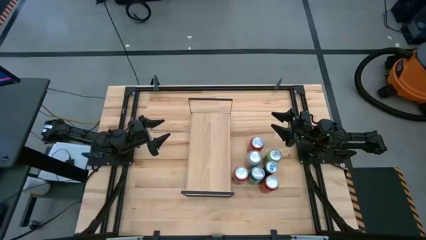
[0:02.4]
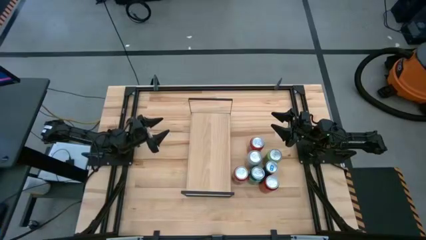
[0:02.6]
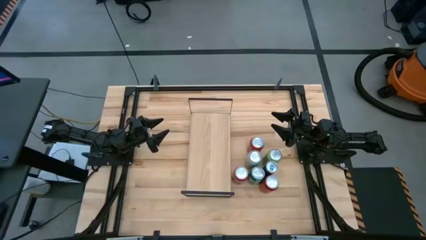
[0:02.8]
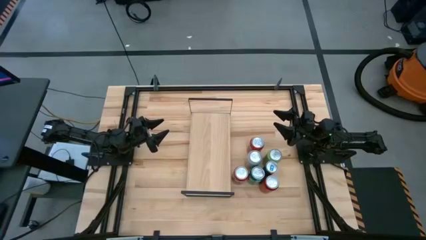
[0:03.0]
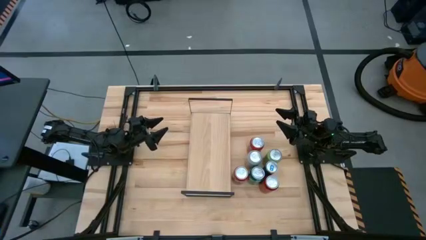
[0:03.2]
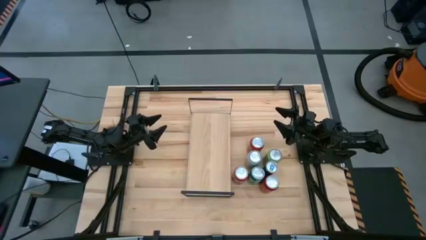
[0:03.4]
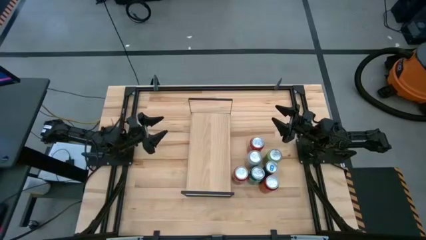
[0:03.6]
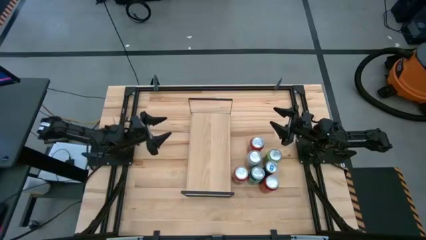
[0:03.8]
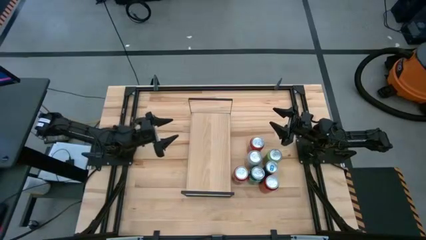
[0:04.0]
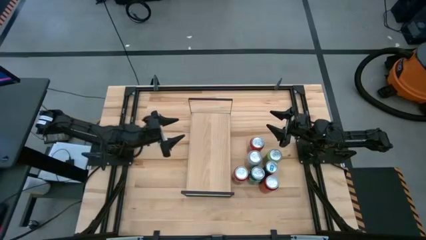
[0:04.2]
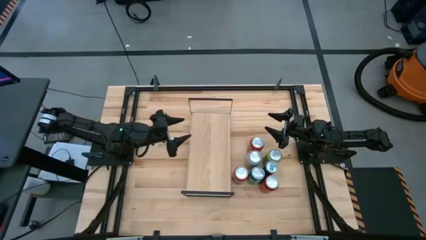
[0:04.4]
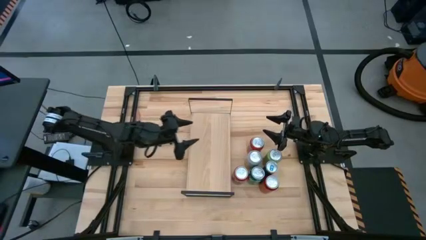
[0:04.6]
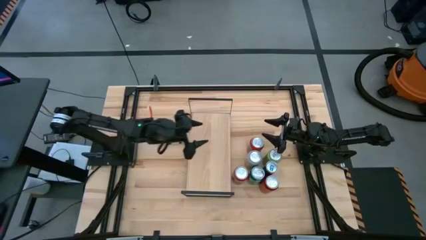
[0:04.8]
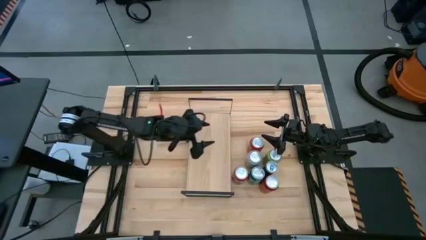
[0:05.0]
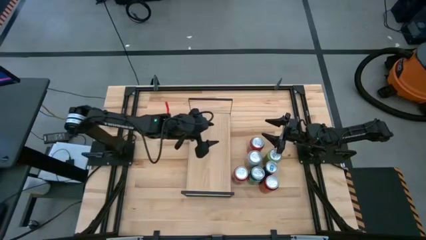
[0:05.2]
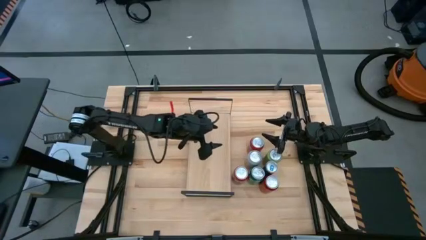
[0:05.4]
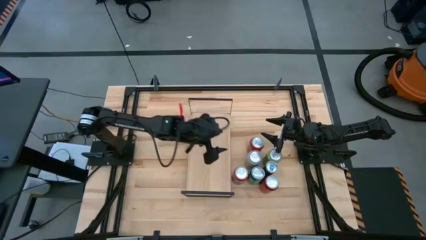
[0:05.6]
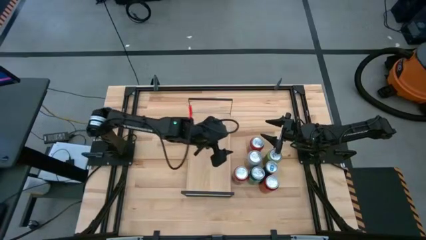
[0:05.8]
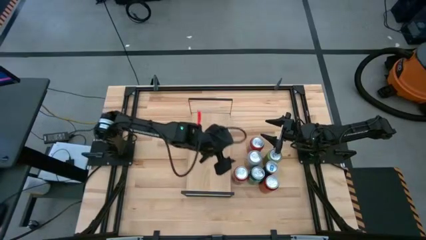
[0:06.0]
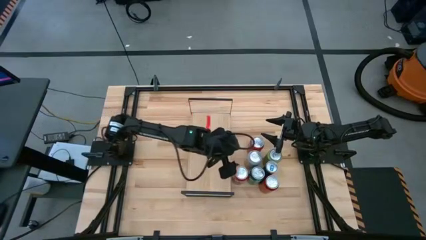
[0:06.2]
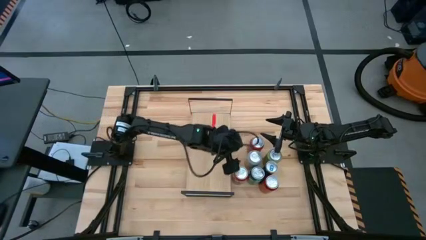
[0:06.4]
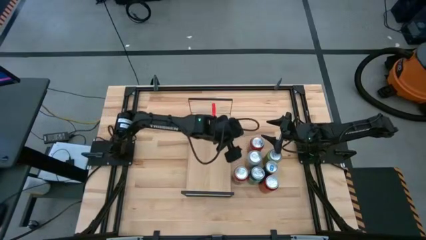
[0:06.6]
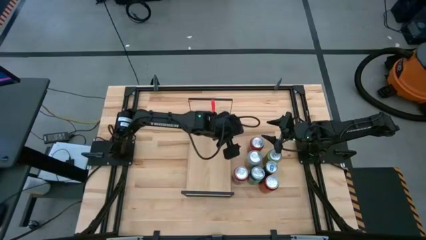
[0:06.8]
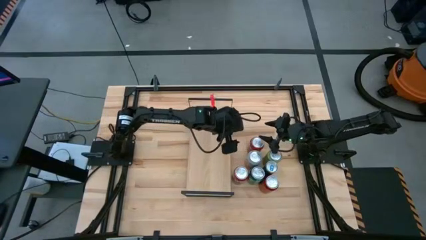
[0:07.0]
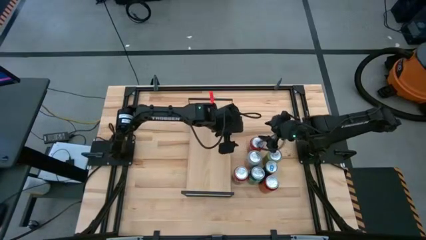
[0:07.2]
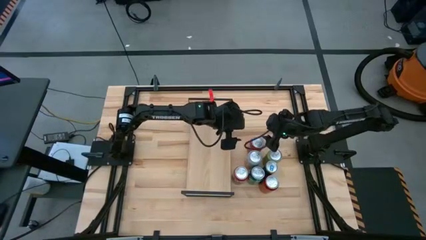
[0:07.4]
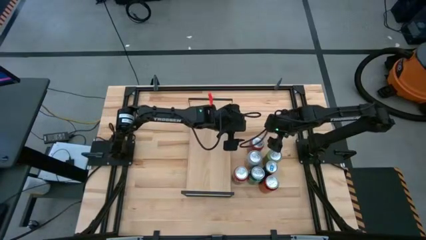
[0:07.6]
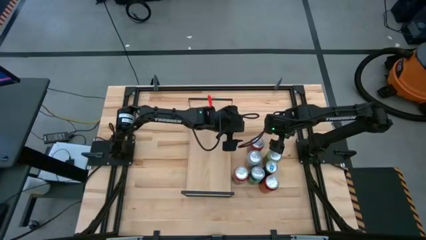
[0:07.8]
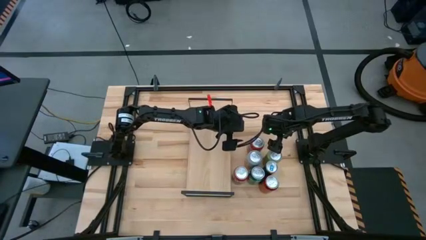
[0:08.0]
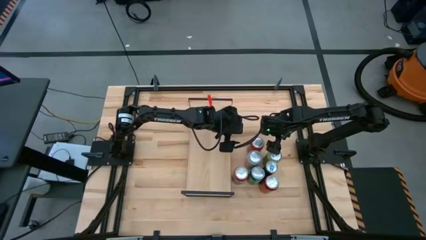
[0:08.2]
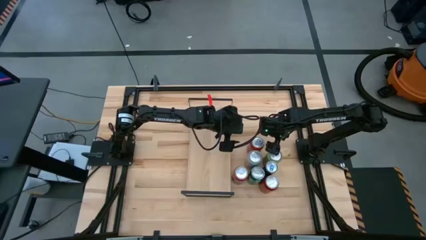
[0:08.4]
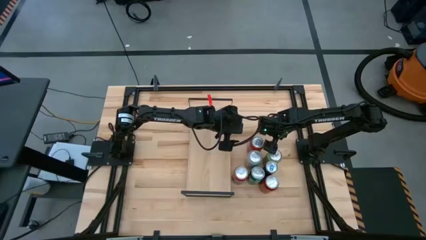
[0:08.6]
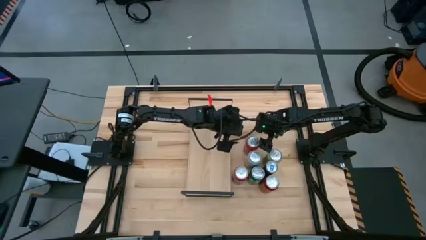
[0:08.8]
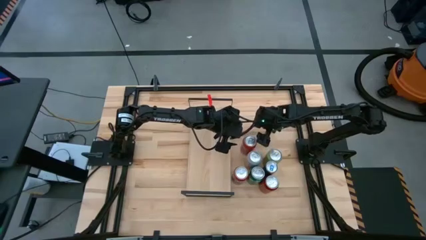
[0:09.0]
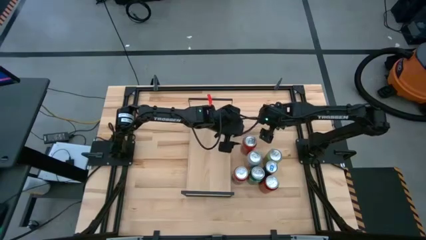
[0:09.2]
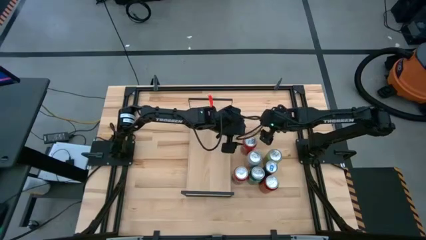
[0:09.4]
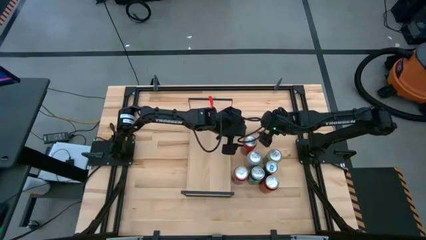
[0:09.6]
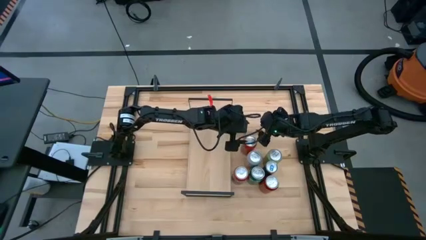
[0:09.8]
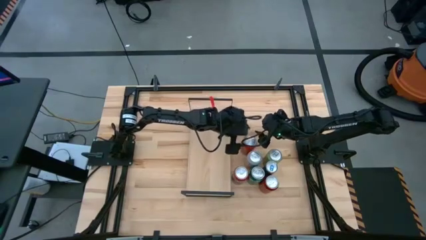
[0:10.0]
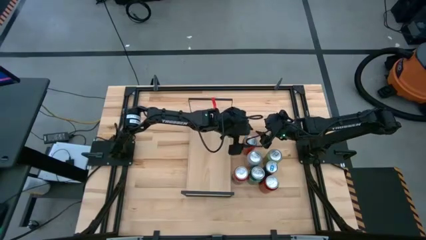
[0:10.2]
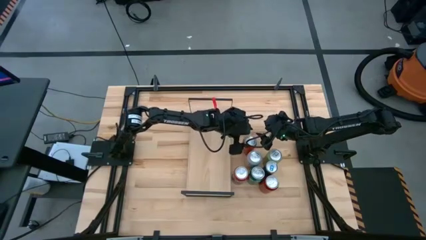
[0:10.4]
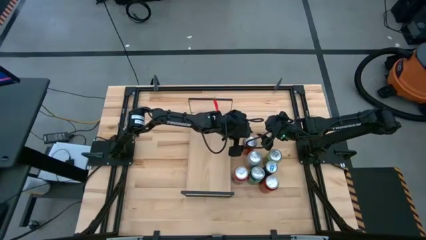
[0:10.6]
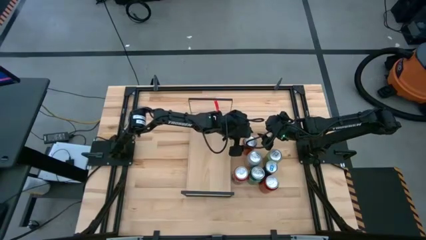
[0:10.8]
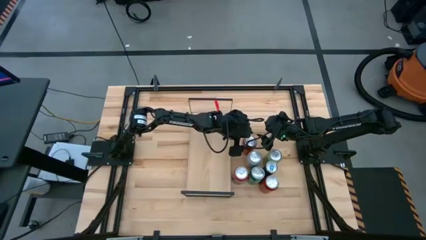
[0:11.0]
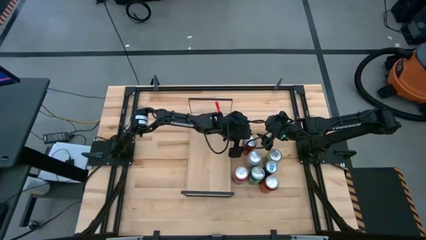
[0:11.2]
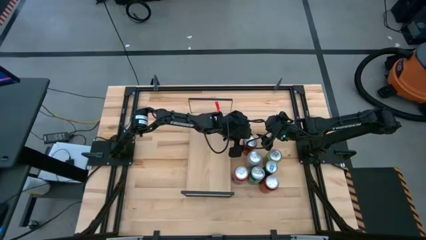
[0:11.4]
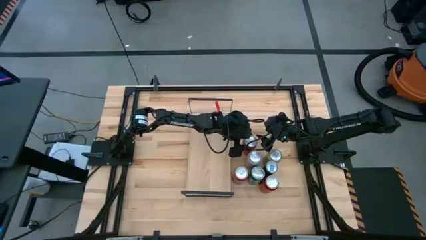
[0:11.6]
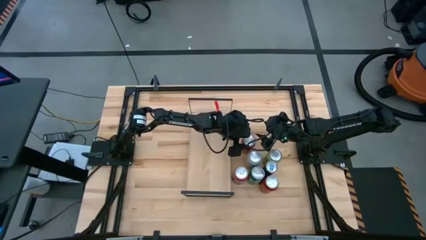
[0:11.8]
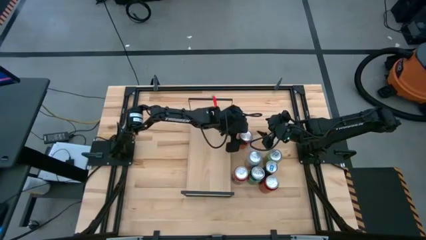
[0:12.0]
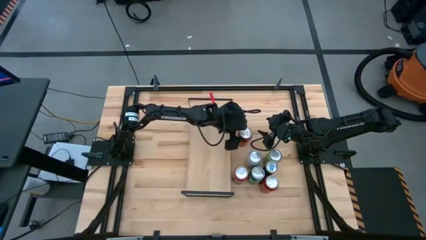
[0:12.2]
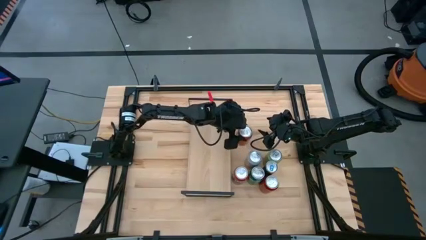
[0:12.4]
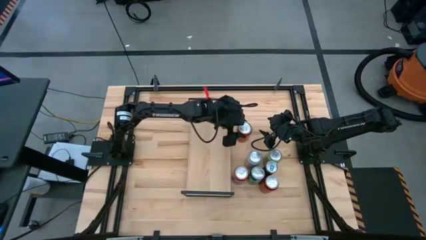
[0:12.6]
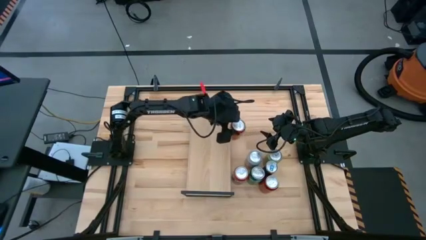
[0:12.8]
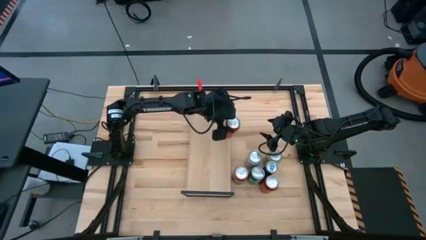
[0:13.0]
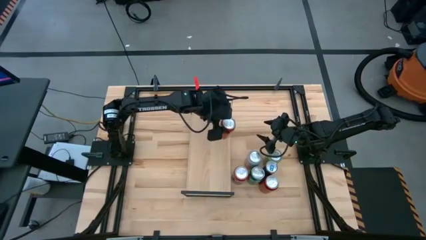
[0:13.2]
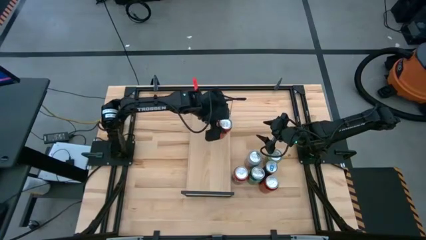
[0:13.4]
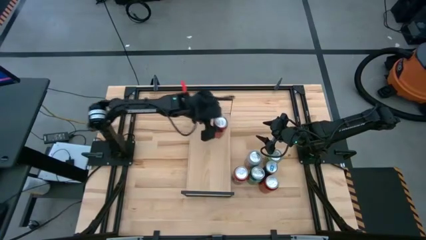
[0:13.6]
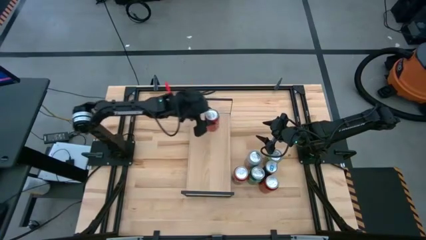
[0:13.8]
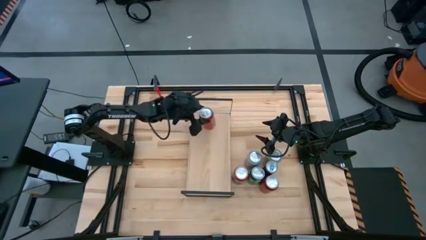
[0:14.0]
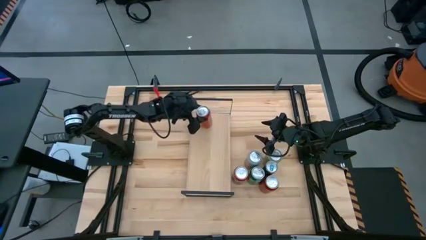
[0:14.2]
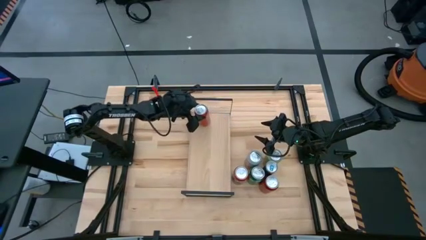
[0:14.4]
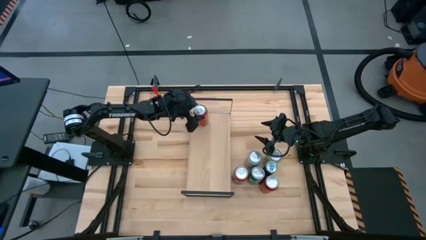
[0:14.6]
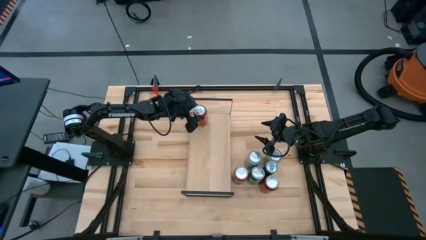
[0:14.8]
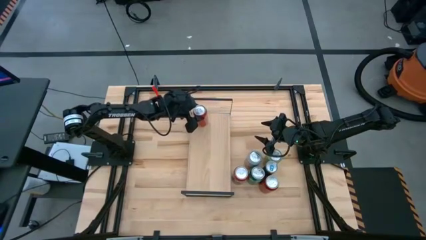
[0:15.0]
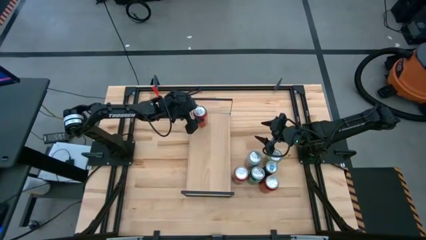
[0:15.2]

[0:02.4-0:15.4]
Task: Place canned beverage on shelf
Put the top red soda can on the shelf

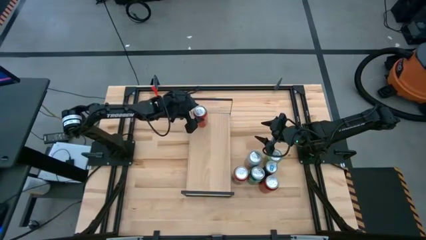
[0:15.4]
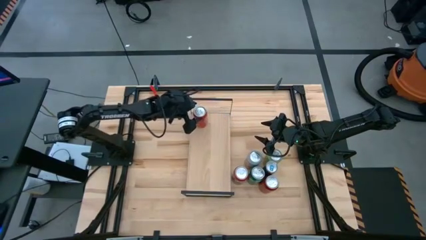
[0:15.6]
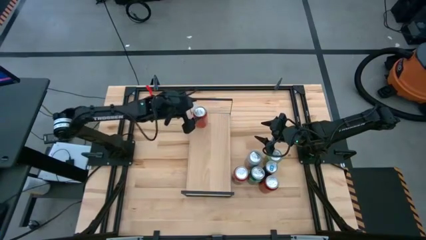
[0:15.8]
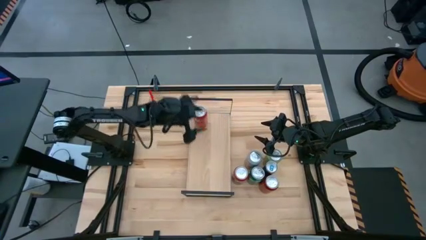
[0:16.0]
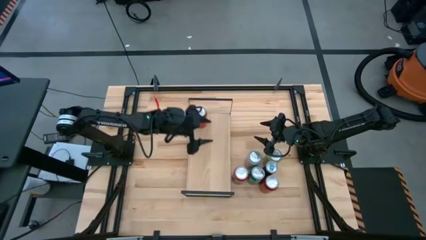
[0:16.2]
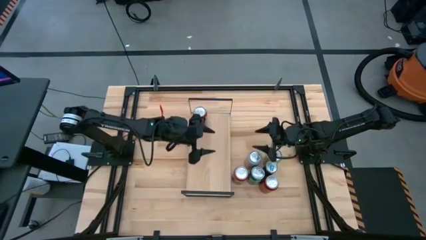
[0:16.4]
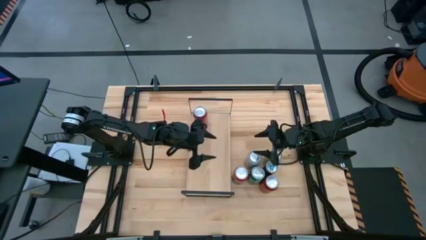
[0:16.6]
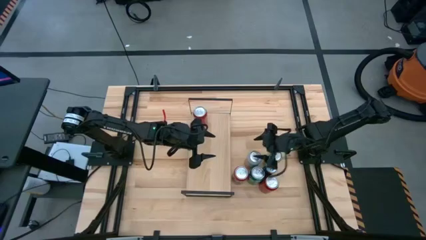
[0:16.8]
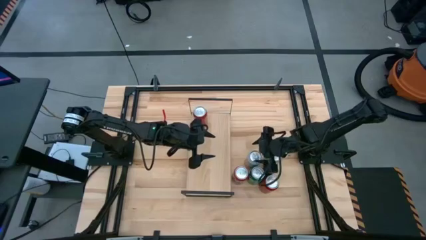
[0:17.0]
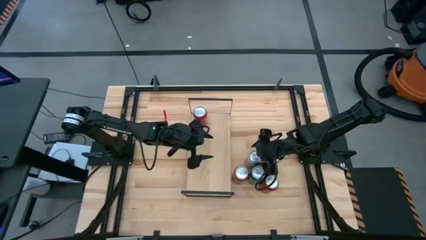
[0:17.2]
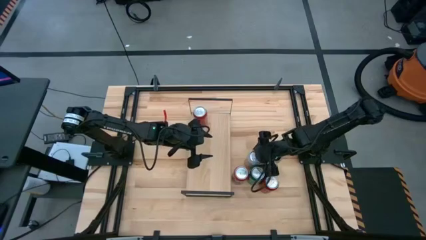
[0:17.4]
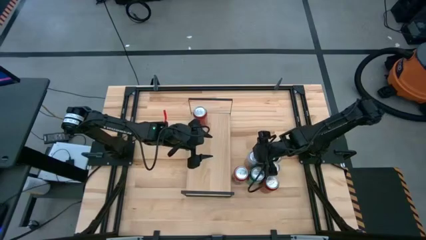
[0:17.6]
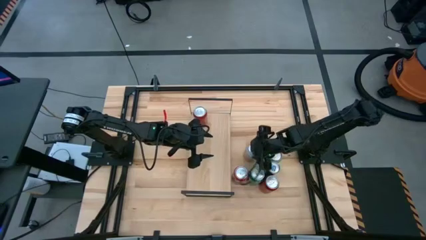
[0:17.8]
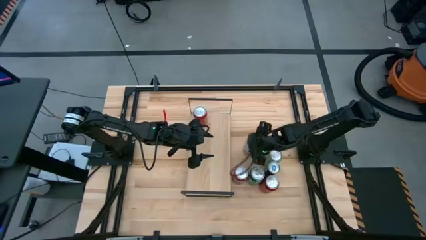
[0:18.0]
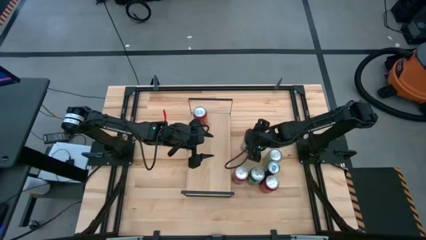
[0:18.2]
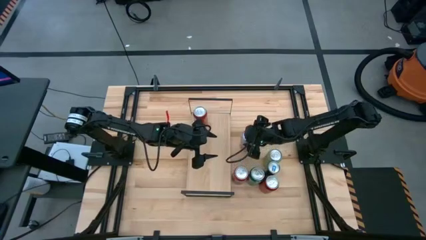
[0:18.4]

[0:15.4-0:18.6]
Put the pink white soda can on the shelf
